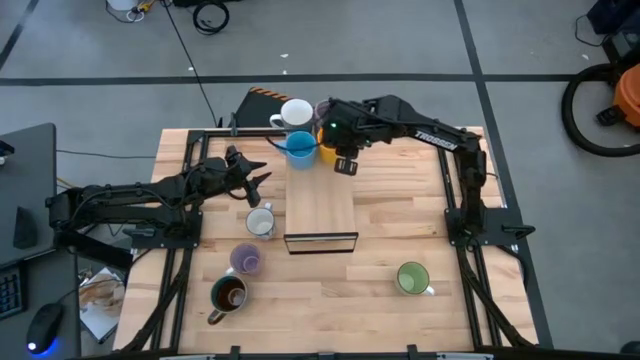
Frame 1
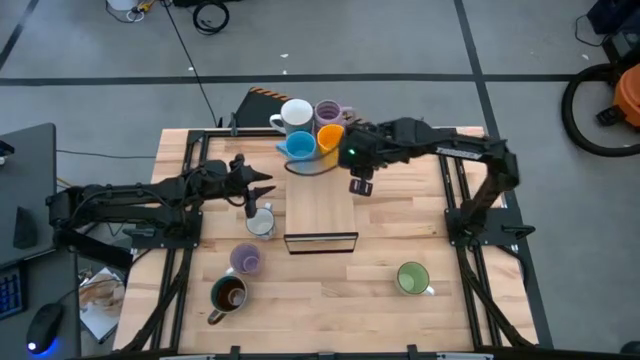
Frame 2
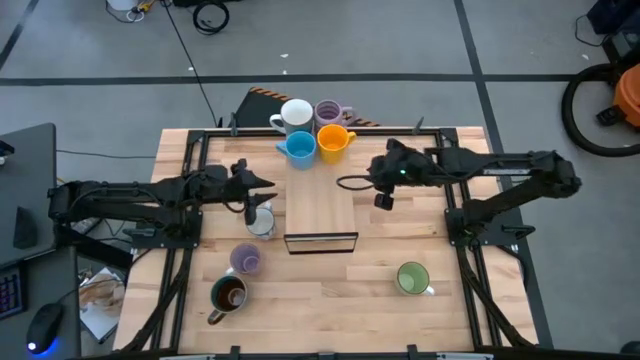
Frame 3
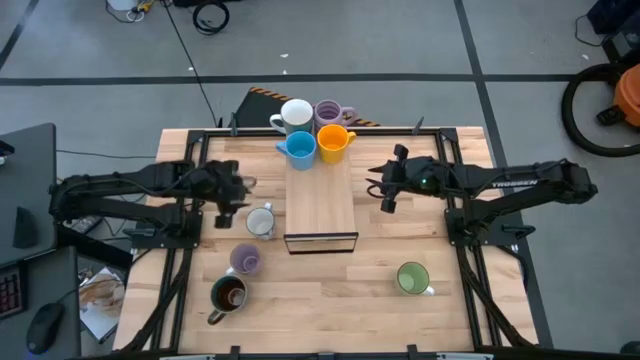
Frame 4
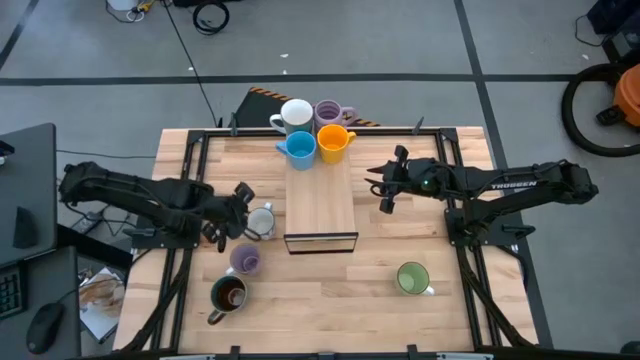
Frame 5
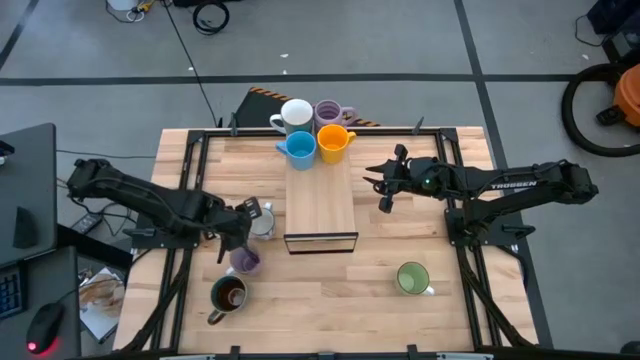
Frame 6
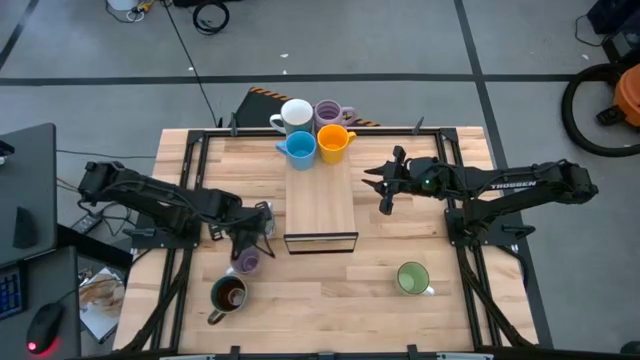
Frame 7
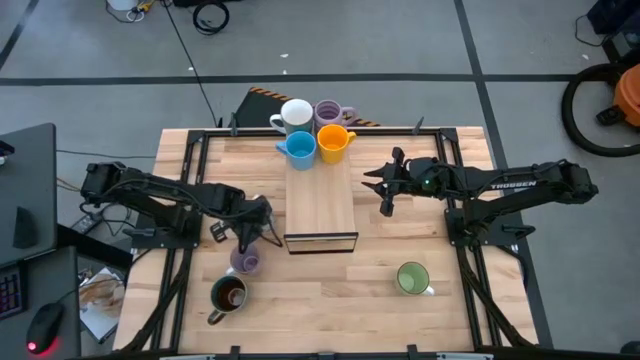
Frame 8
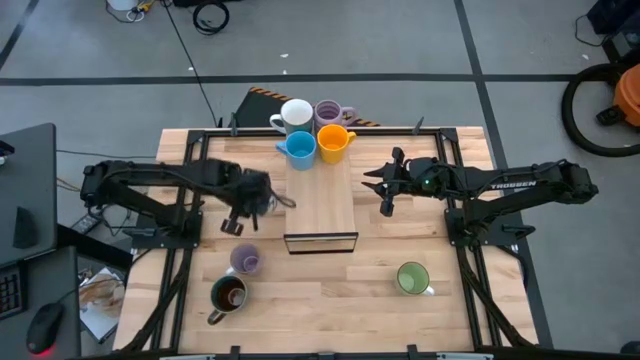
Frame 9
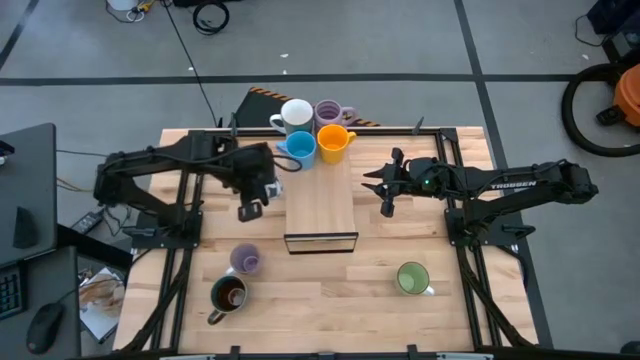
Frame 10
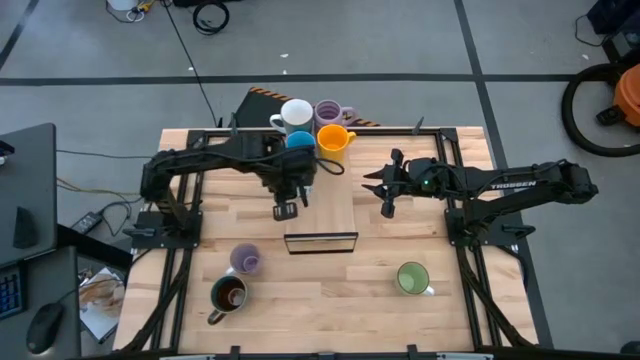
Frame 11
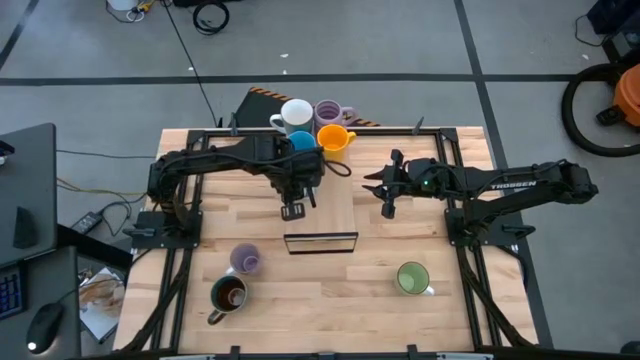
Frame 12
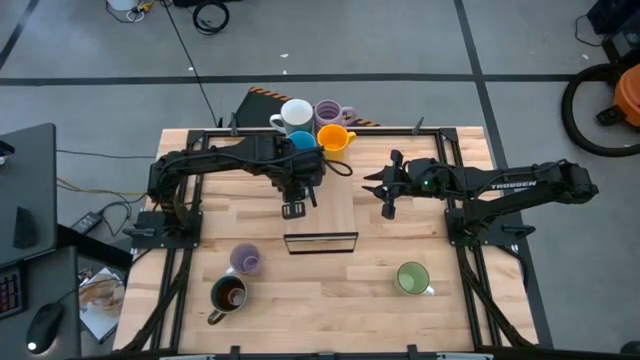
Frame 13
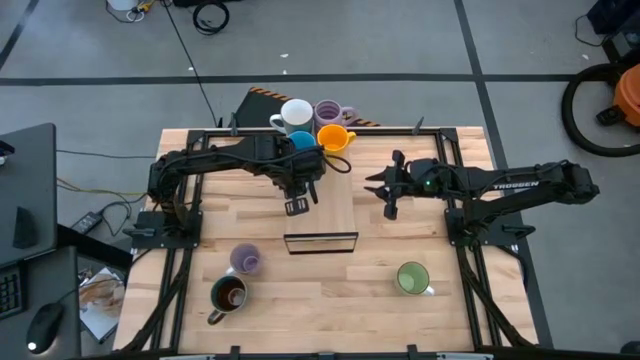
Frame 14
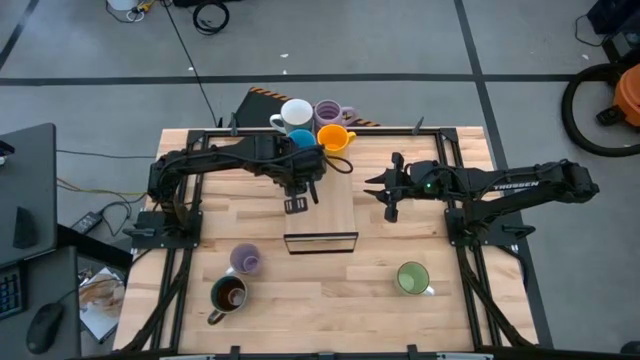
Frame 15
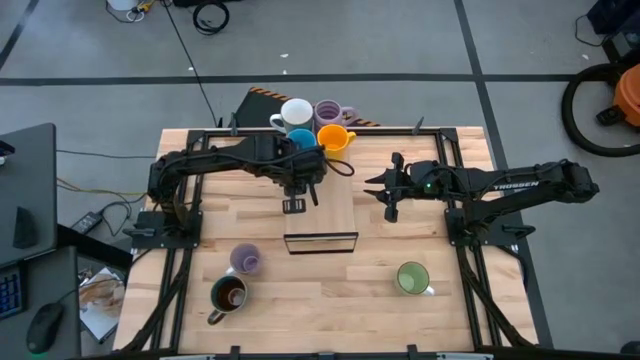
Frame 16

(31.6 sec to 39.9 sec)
Task: Place coffee mugs
Put the Patterned mug on the shelf

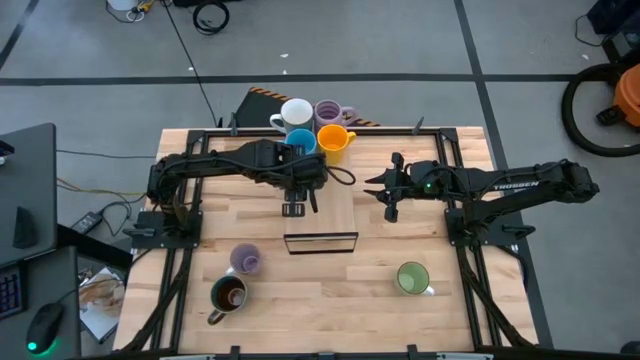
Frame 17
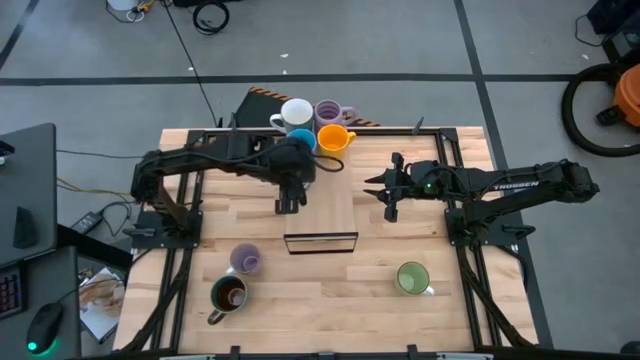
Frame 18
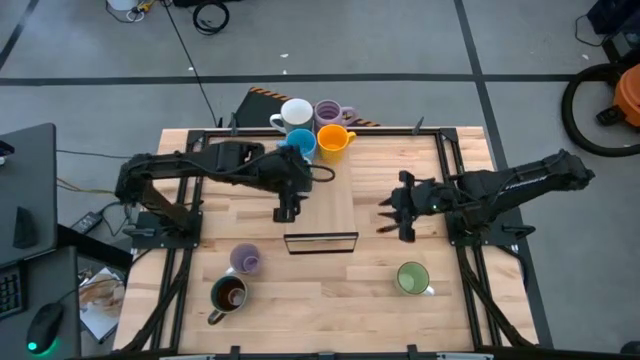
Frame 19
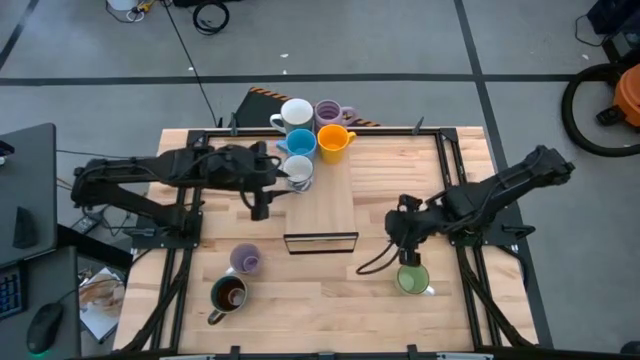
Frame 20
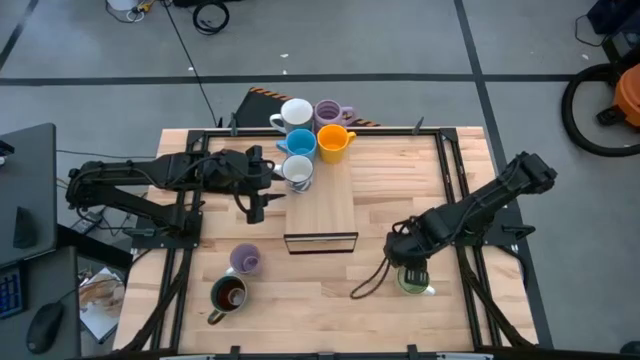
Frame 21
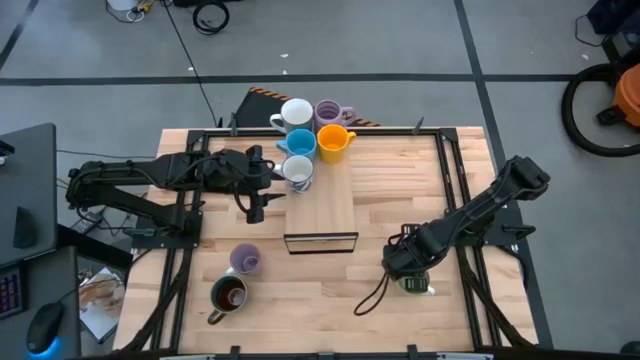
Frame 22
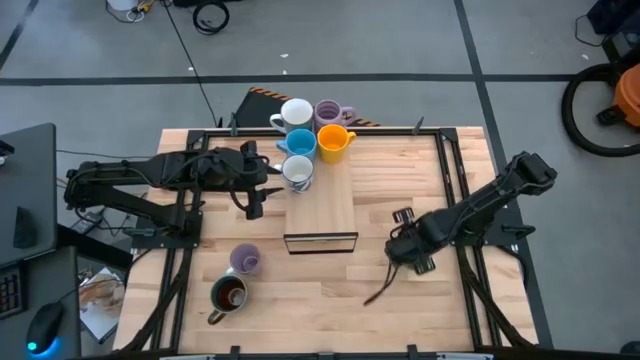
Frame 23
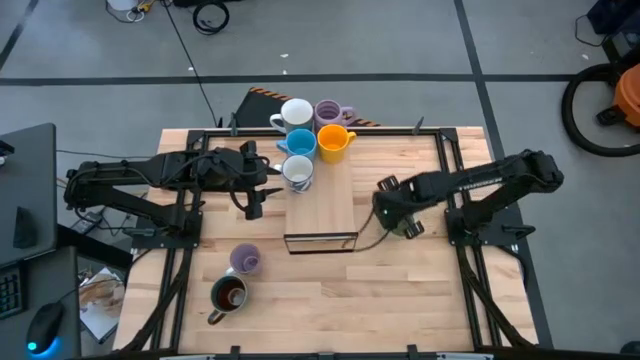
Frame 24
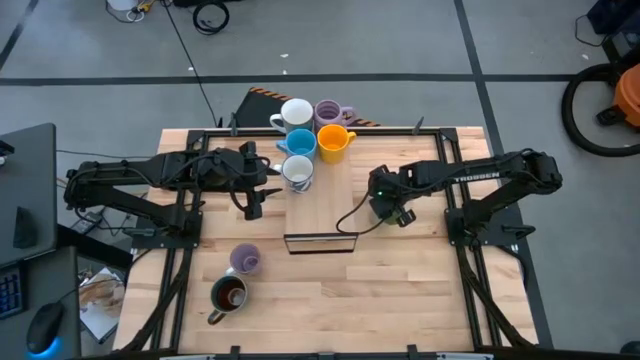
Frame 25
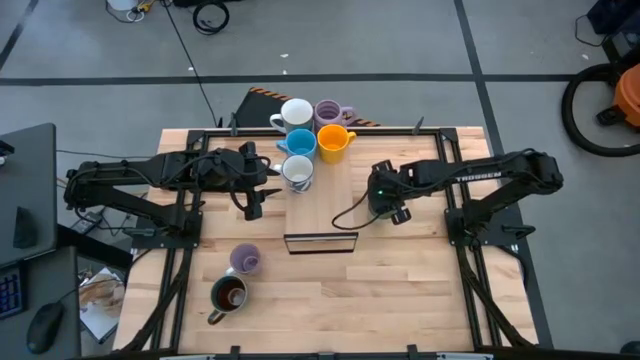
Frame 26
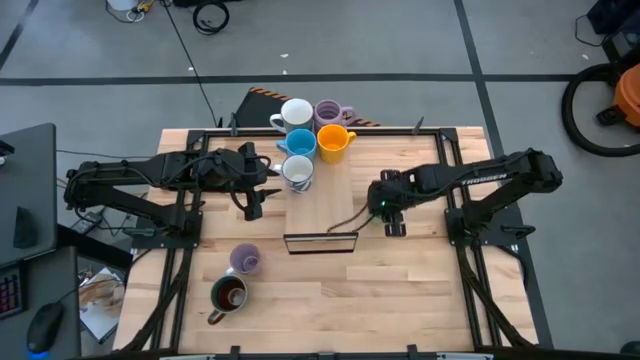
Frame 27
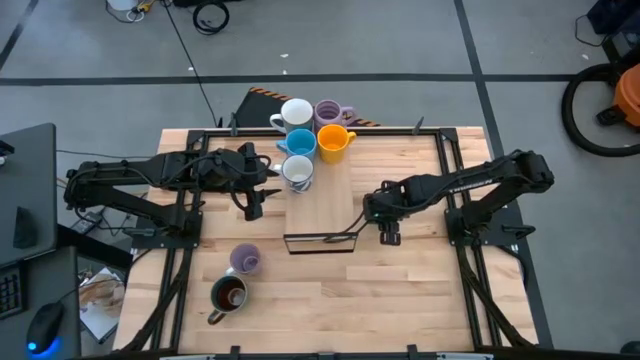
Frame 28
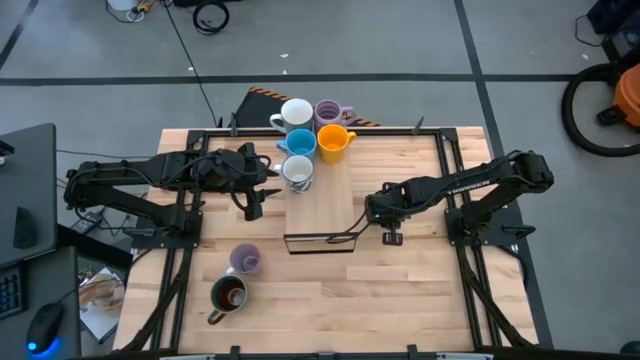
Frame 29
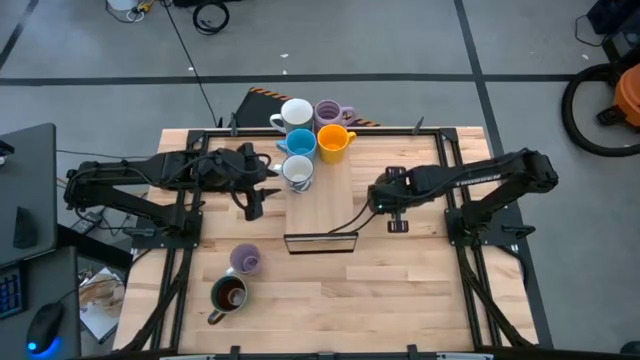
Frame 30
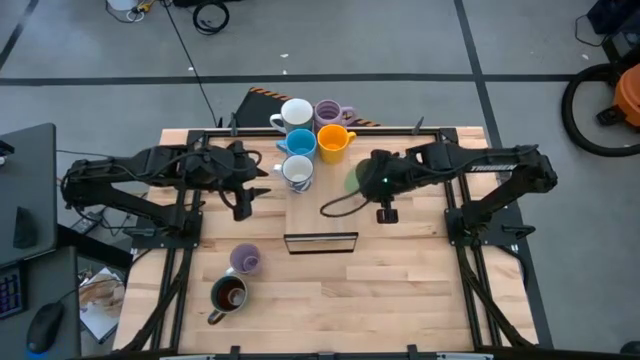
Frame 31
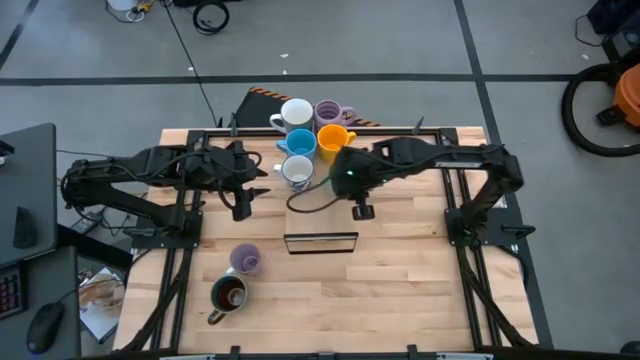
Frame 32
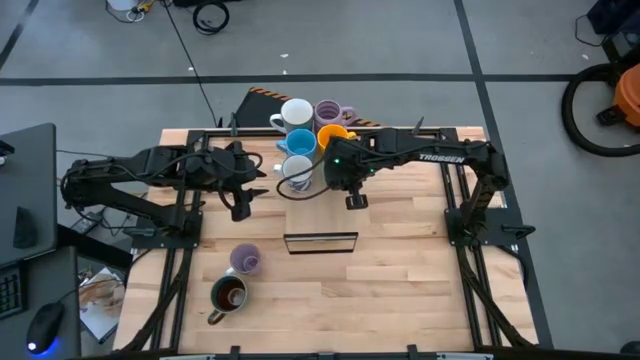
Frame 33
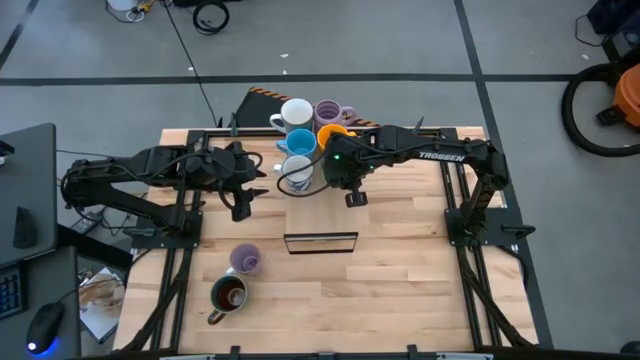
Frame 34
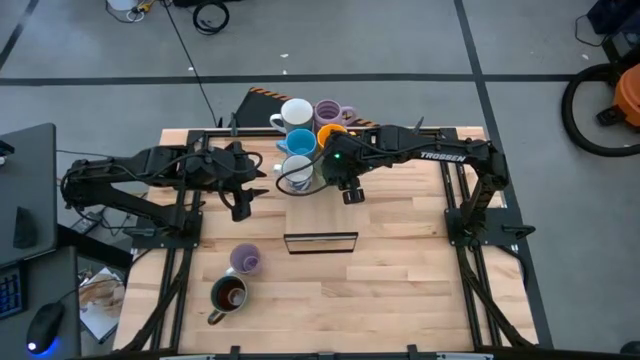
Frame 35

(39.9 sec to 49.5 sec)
Put the green mug on the shelf

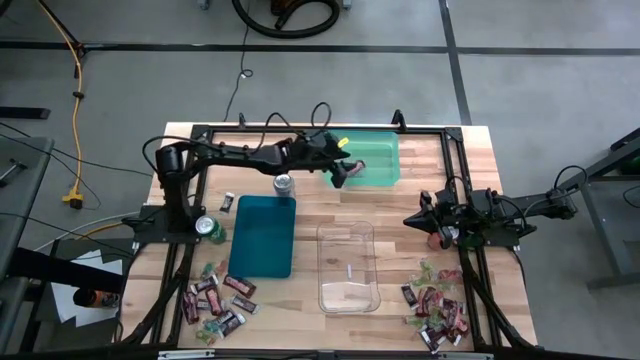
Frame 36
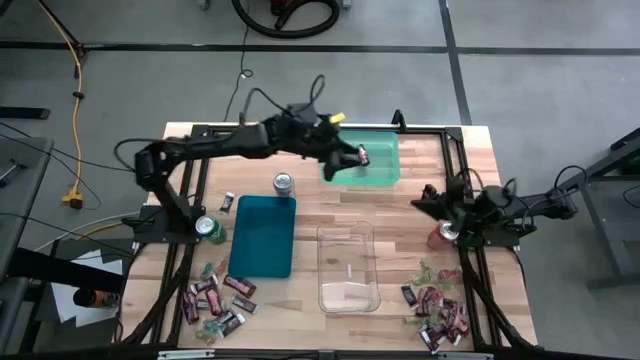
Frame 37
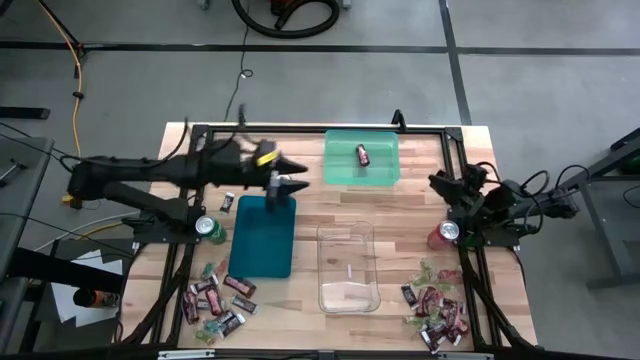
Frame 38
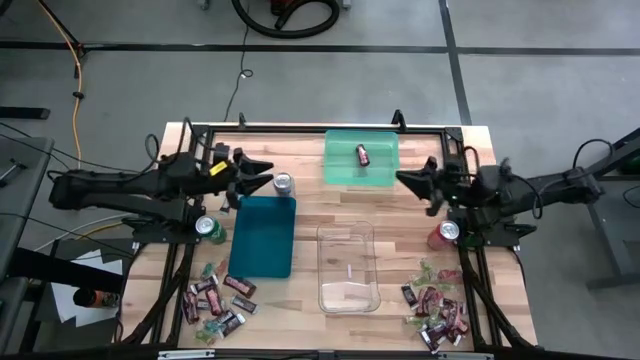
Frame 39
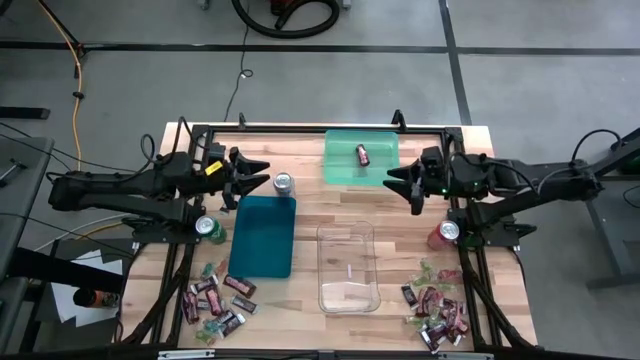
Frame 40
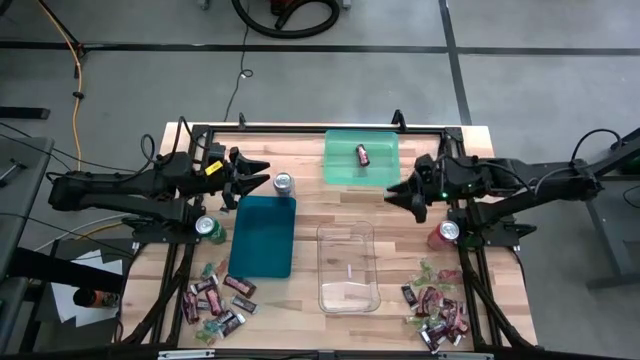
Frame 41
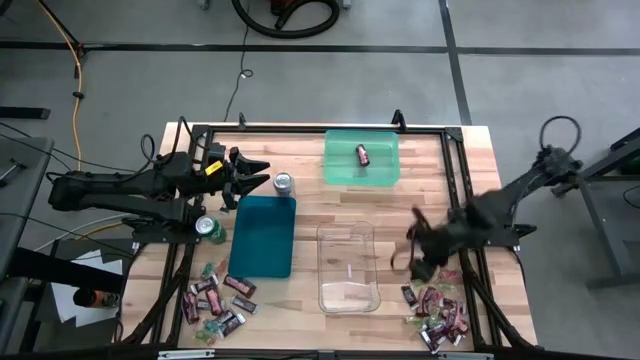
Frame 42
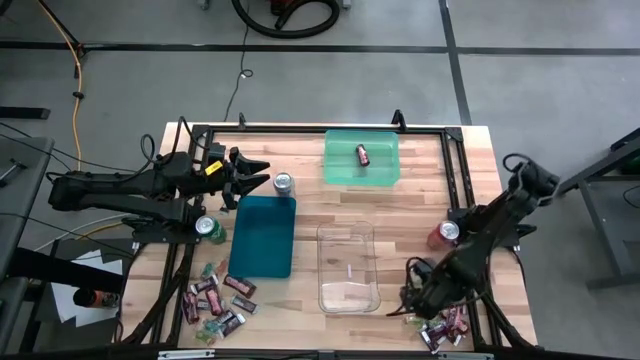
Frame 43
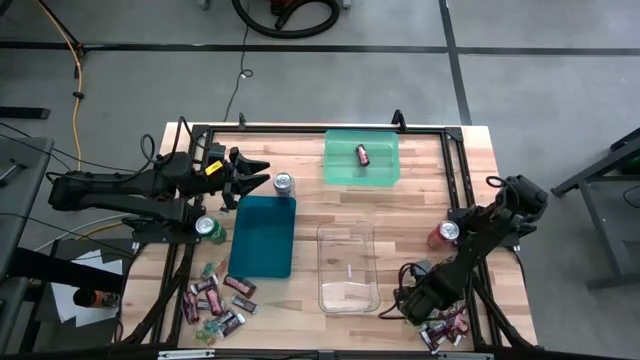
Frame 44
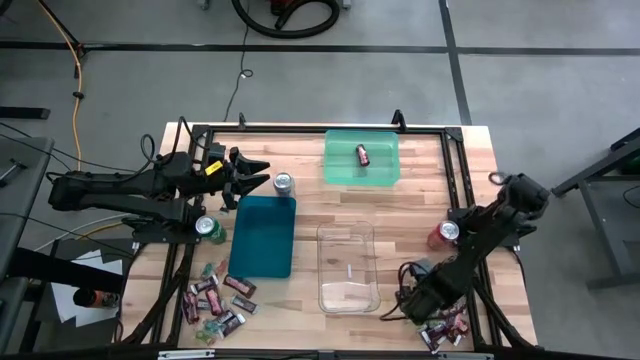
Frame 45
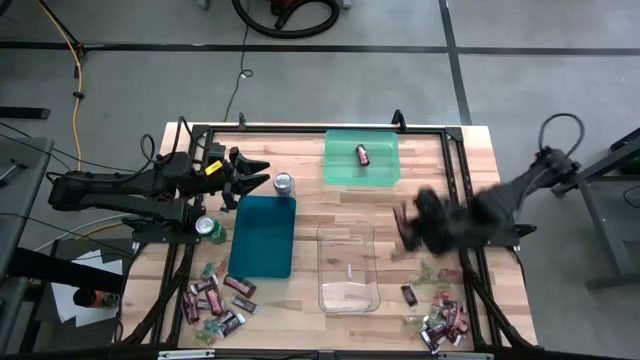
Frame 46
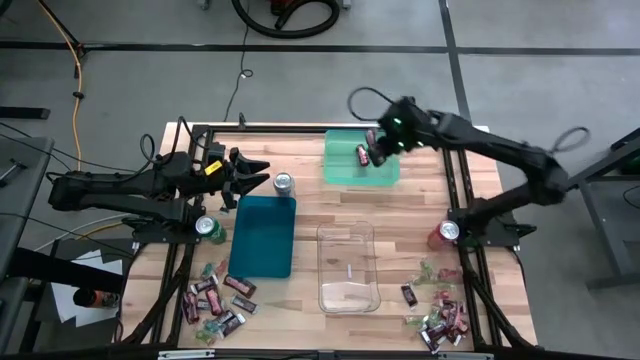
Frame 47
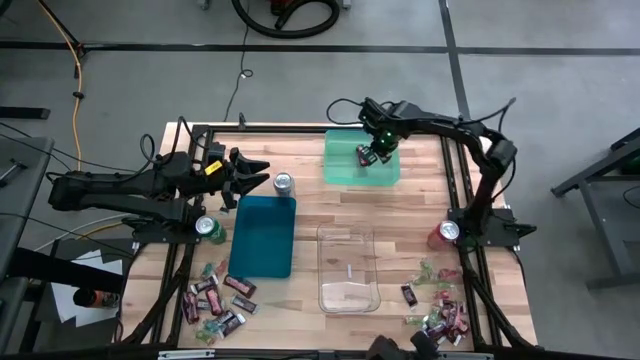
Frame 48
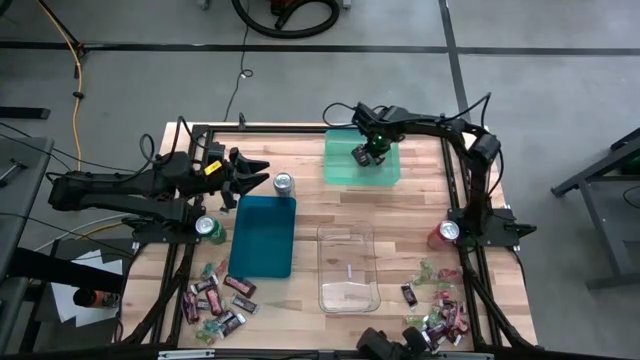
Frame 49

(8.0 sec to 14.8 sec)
Task: Sort candy
Put the chocolate peanut bar into the green bin
